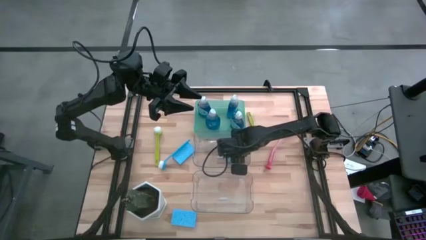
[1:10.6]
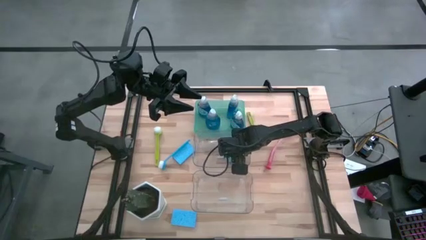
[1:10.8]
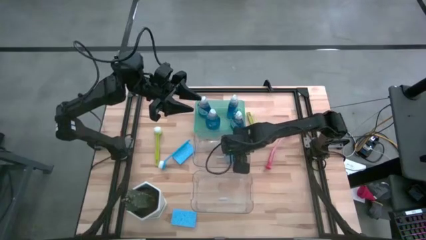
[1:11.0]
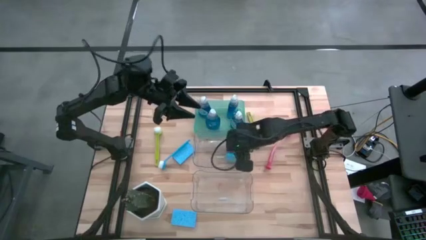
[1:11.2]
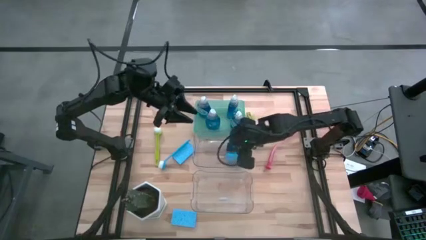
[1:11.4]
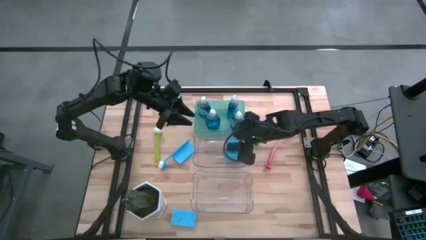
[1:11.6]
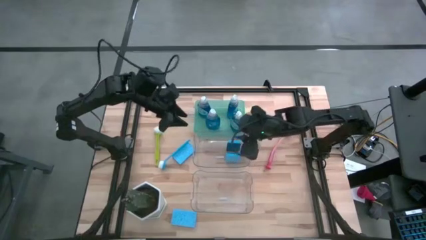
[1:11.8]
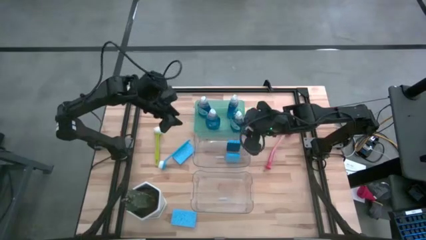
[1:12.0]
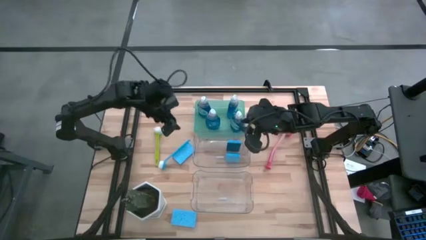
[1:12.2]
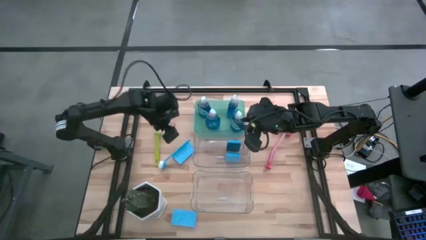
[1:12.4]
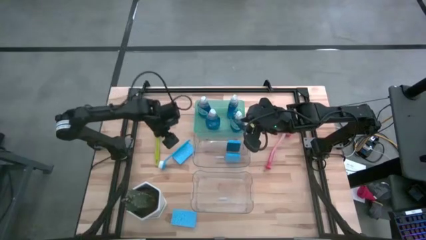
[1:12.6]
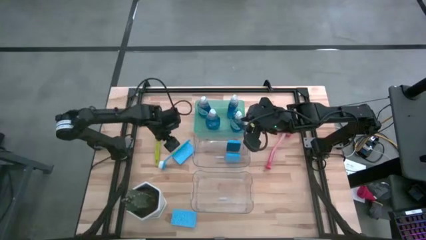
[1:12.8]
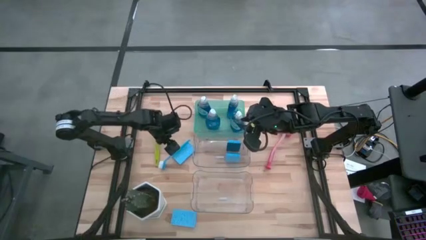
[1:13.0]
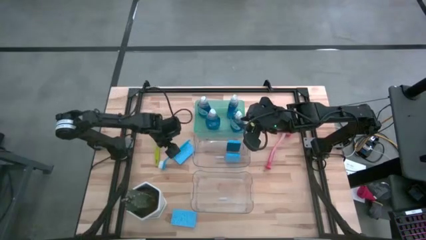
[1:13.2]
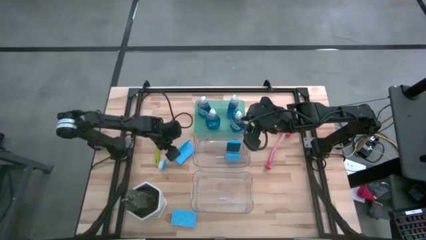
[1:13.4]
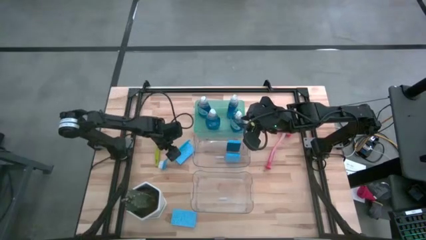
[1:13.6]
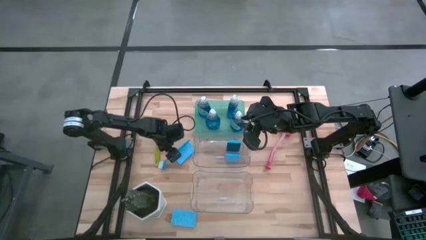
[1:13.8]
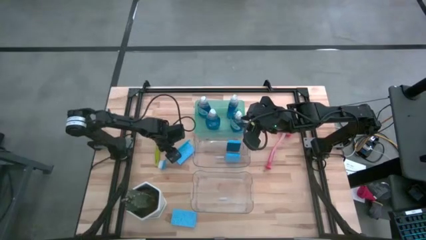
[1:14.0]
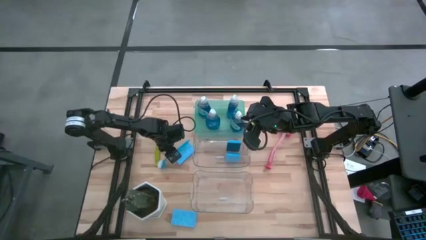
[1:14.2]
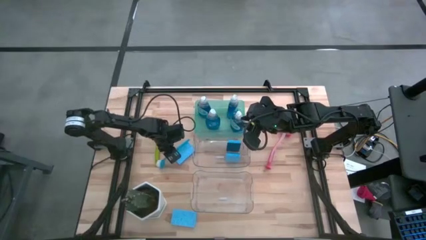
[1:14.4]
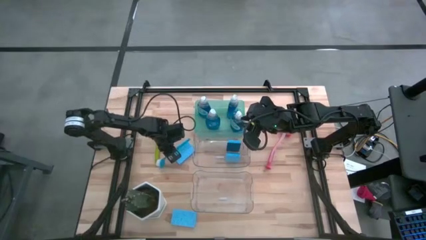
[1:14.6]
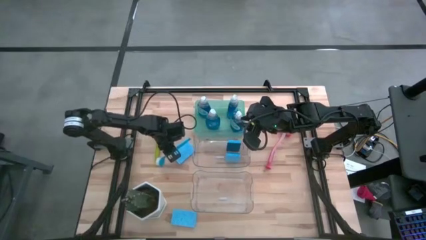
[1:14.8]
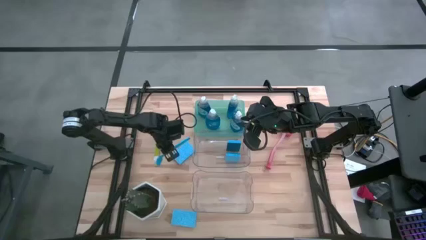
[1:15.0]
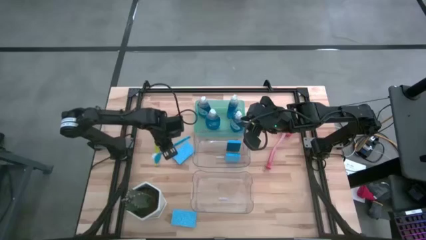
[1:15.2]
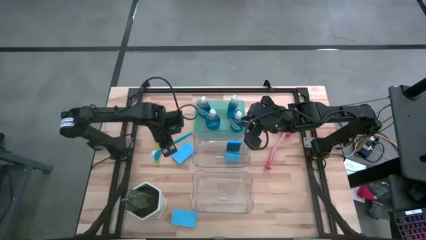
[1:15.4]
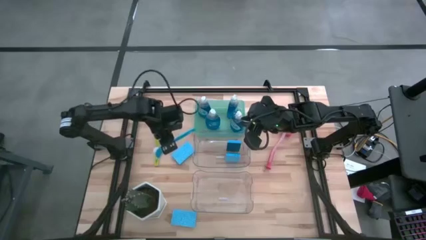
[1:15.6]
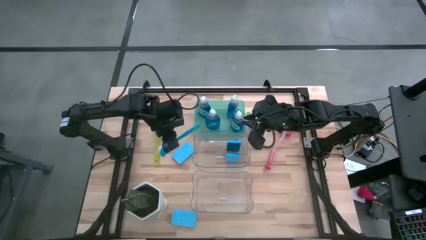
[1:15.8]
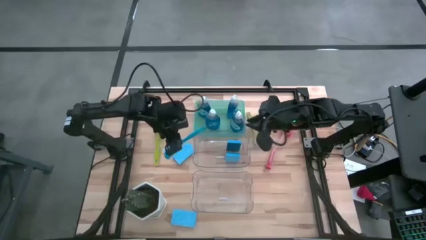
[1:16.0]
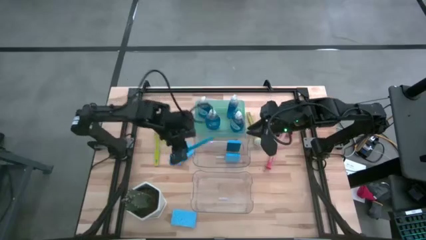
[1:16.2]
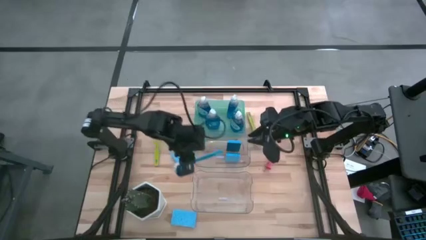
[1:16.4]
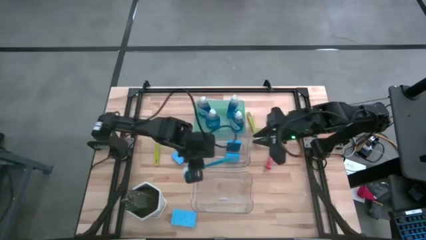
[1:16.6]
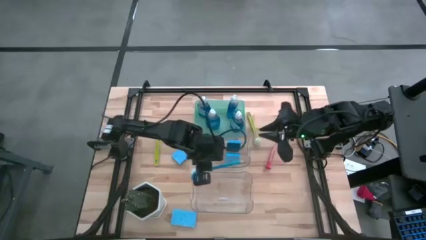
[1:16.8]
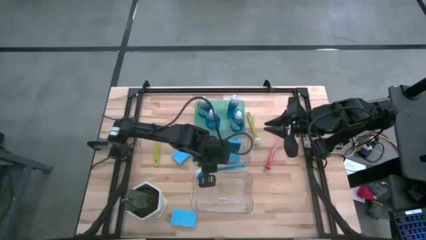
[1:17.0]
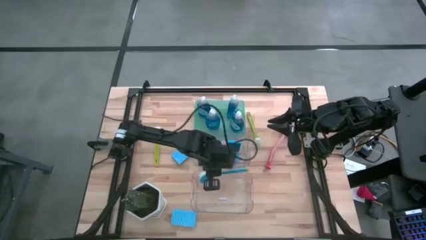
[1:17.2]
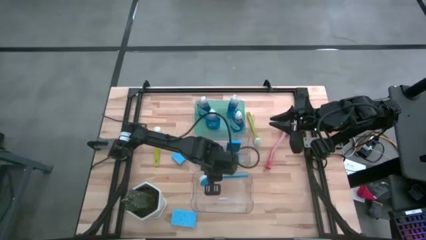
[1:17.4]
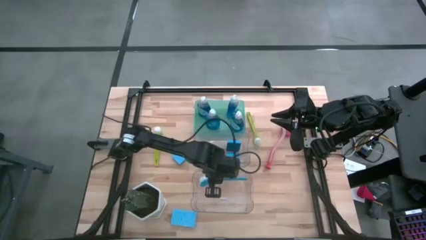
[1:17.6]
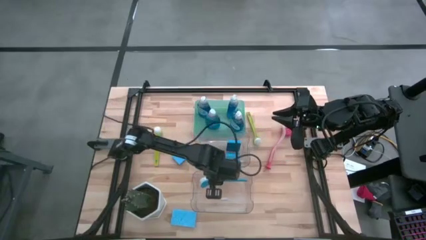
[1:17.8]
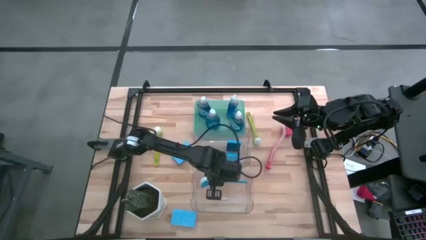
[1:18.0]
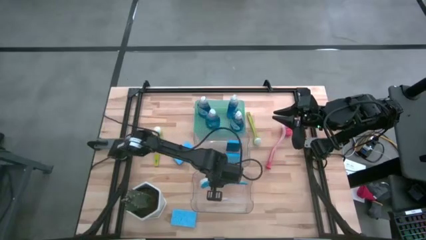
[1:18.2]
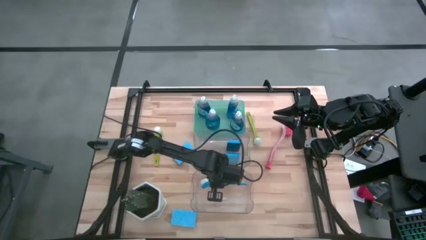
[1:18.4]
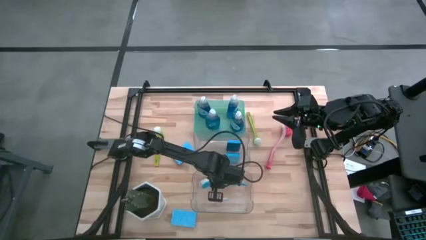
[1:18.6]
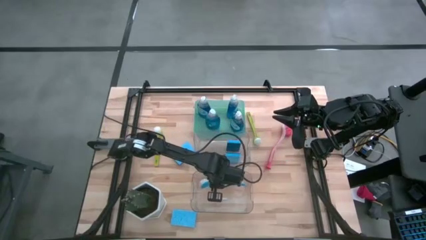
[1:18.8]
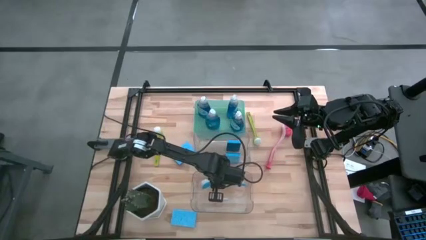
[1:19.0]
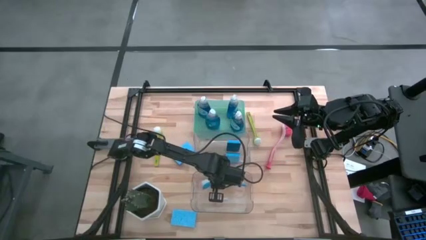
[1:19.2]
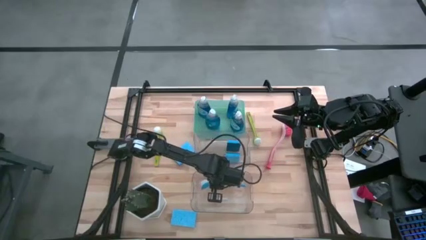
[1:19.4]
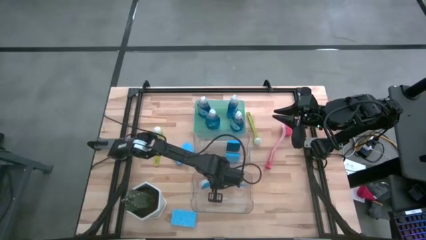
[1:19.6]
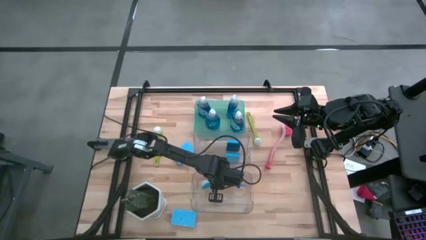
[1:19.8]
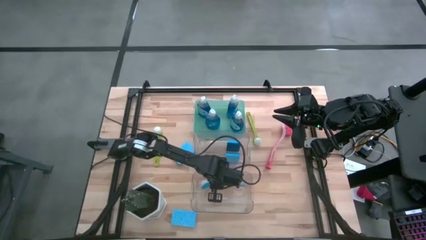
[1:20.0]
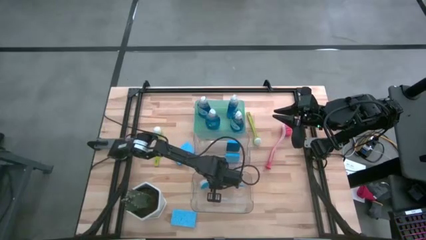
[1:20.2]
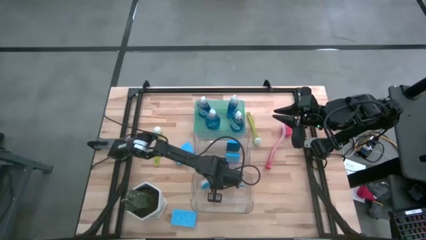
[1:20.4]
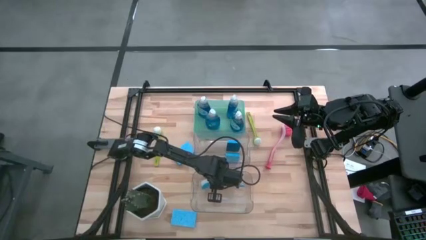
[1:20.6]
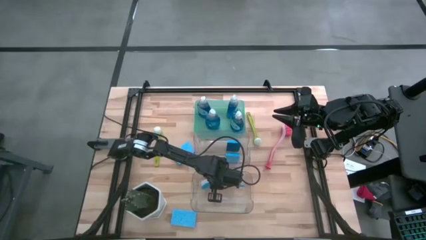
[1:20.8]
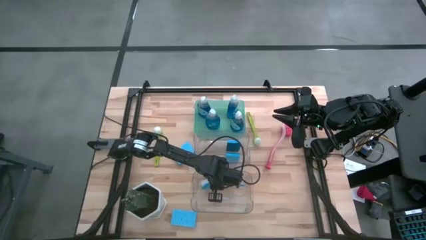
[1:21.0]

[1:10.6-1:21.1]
Task: Pick & Place Kitchen Sink Supplies
Put the blue dish brush into the bottom transparent bin
